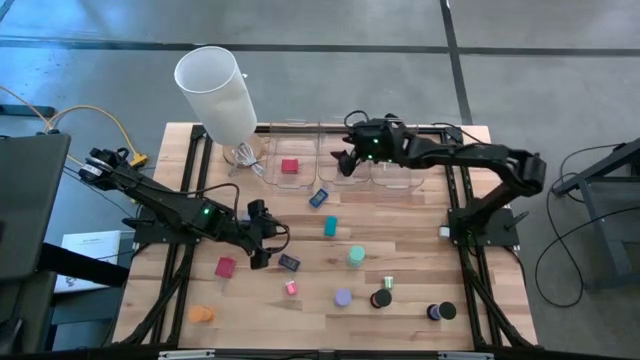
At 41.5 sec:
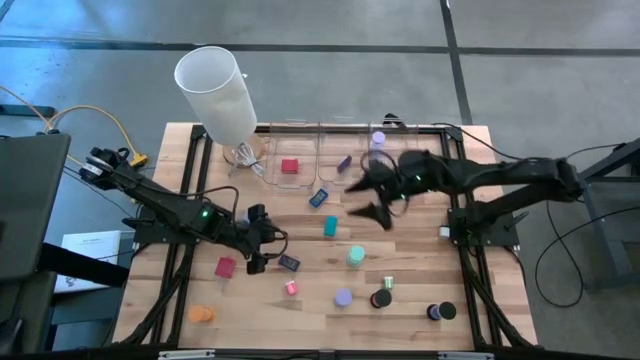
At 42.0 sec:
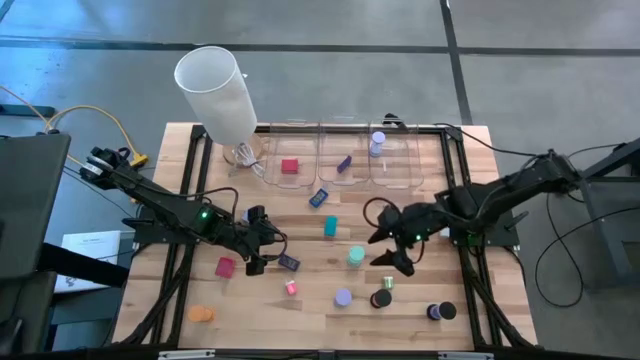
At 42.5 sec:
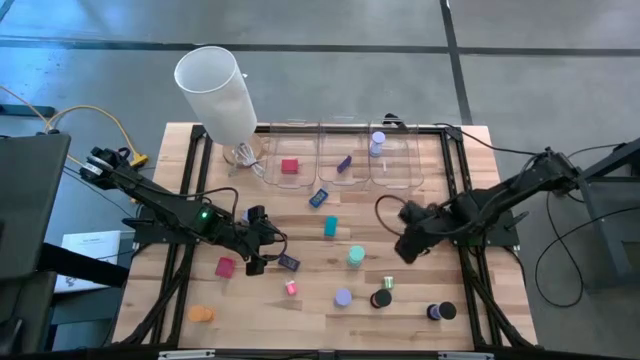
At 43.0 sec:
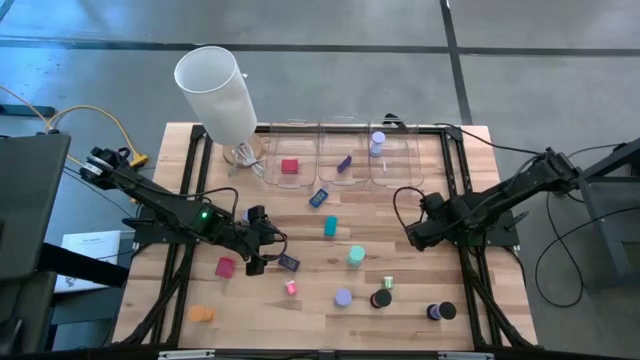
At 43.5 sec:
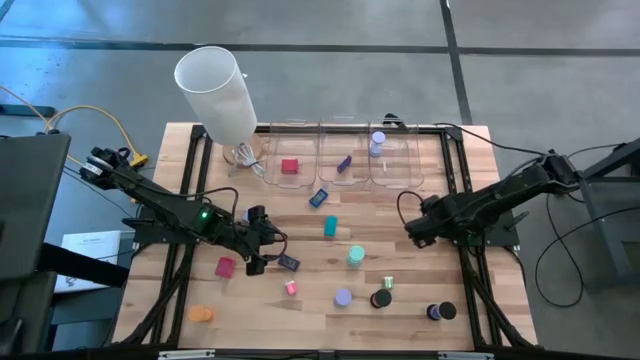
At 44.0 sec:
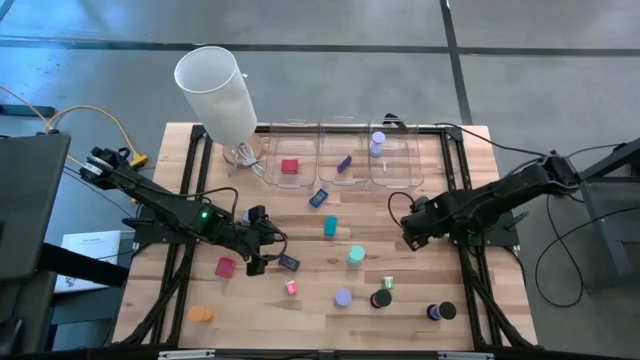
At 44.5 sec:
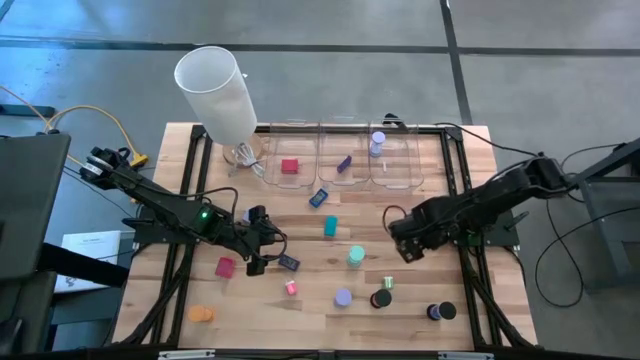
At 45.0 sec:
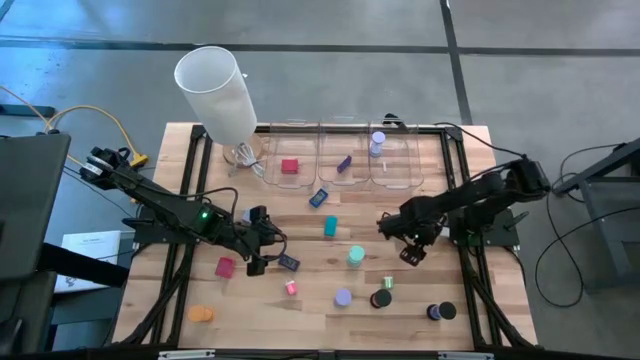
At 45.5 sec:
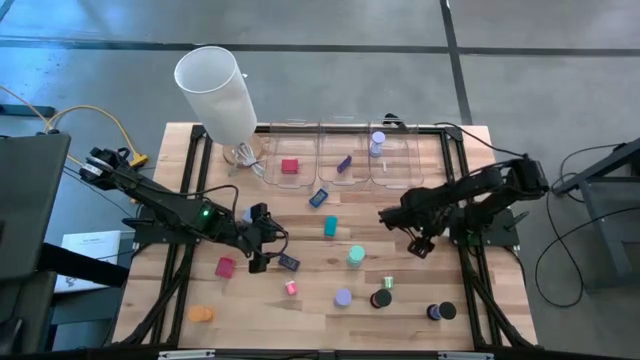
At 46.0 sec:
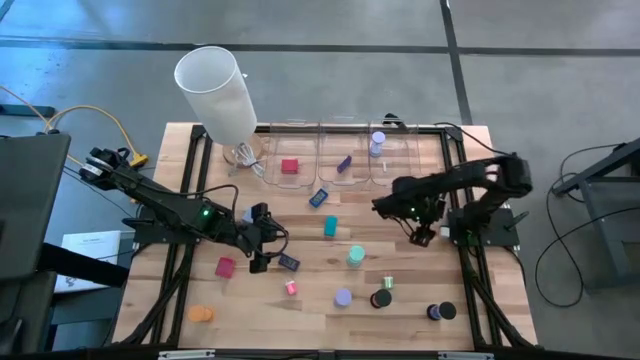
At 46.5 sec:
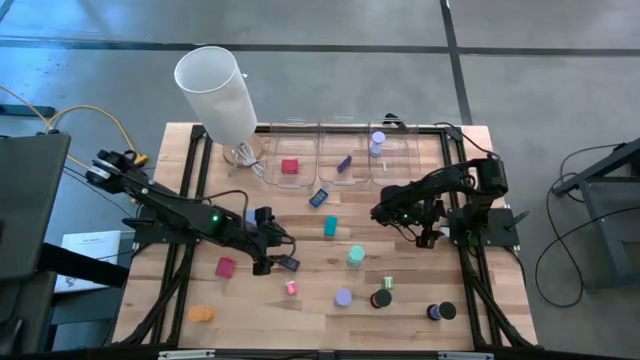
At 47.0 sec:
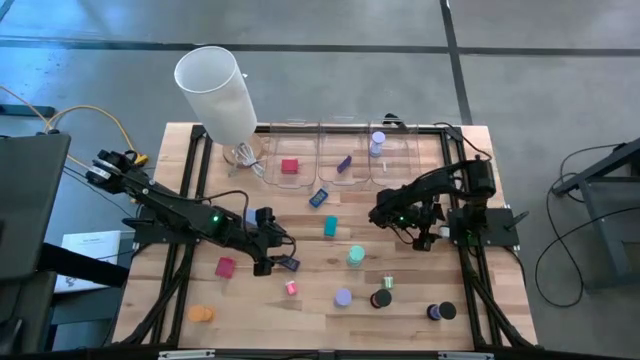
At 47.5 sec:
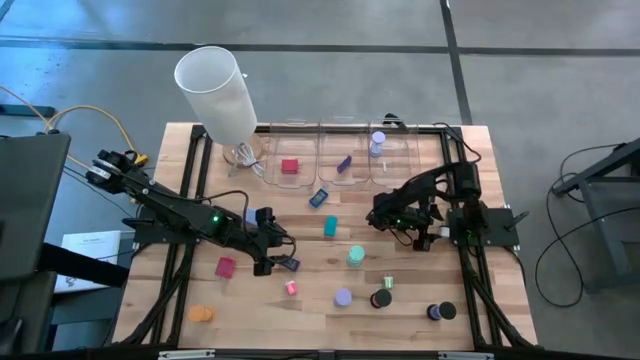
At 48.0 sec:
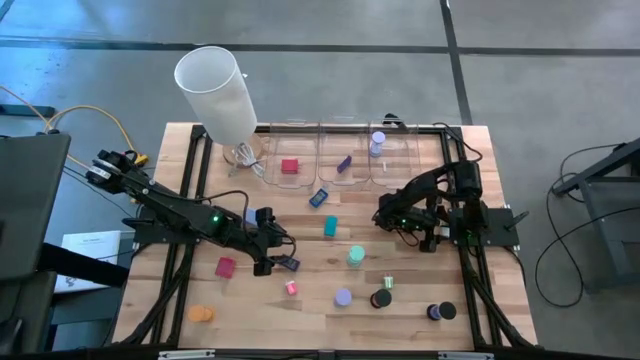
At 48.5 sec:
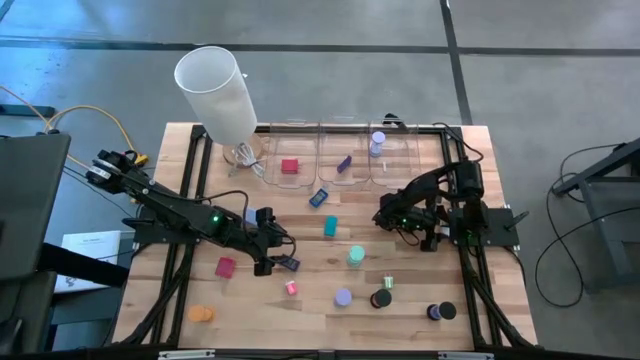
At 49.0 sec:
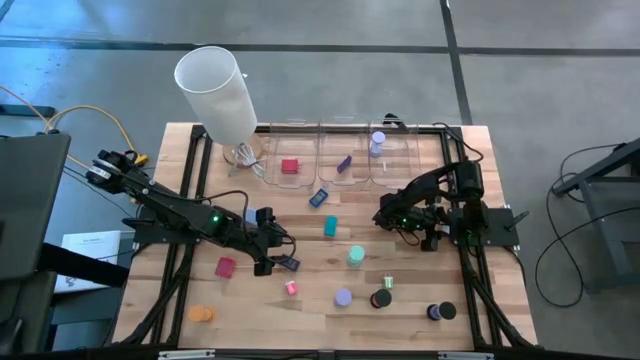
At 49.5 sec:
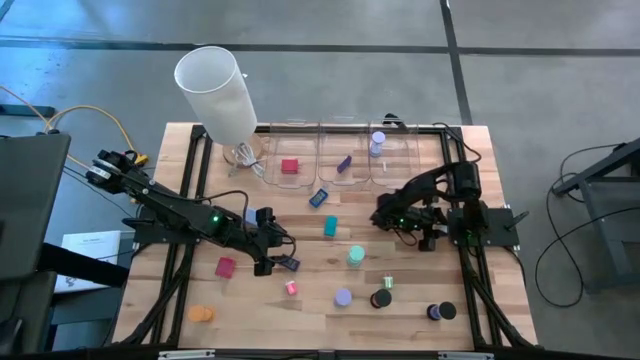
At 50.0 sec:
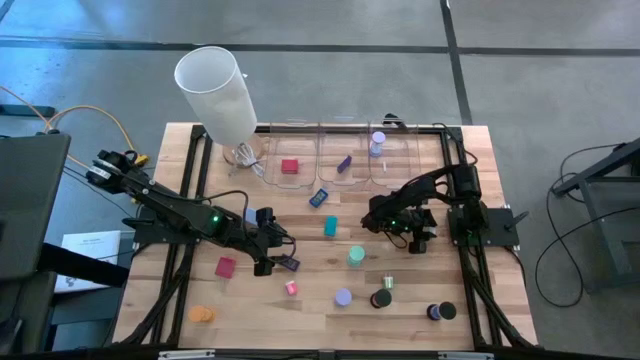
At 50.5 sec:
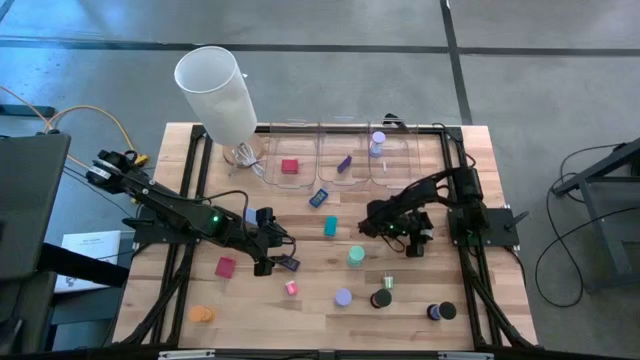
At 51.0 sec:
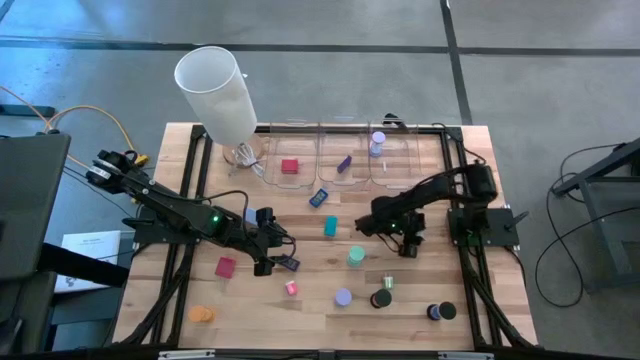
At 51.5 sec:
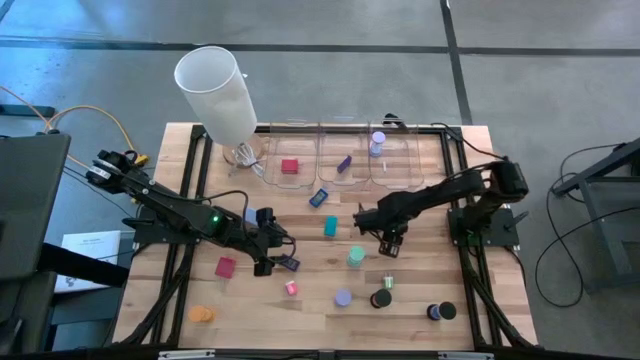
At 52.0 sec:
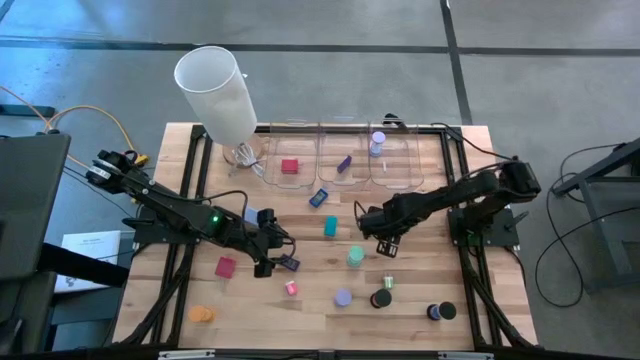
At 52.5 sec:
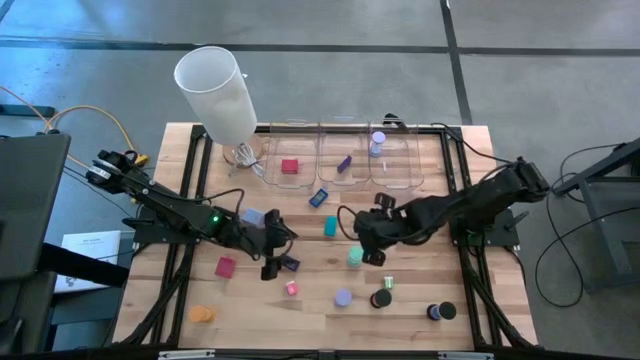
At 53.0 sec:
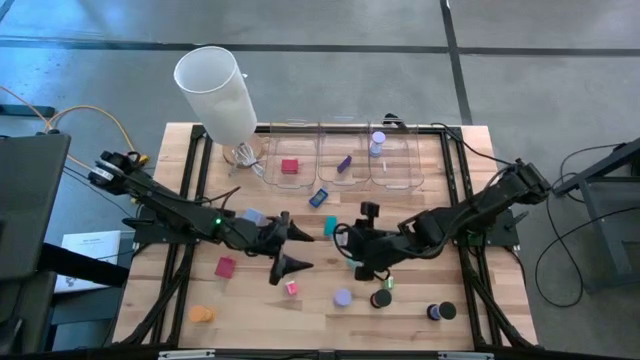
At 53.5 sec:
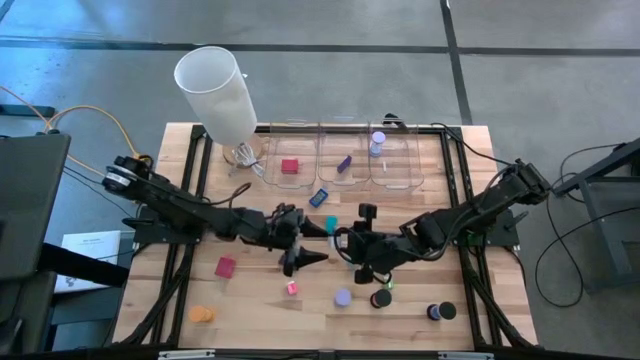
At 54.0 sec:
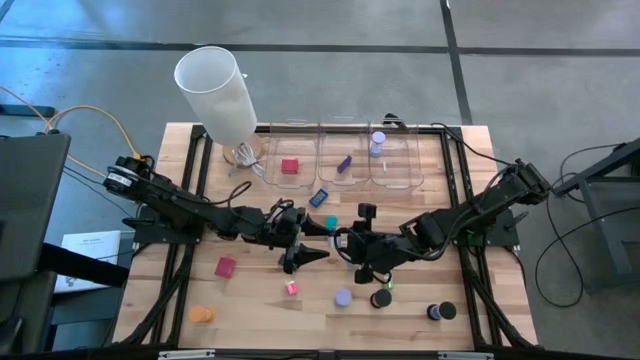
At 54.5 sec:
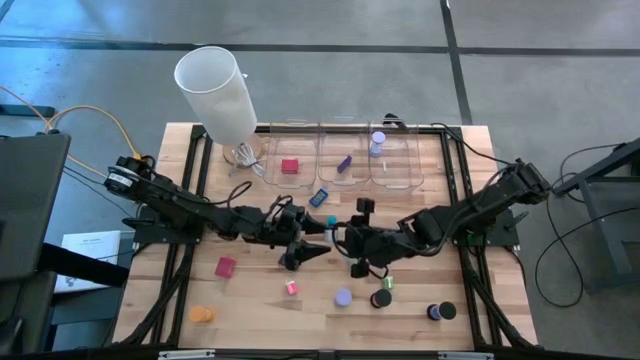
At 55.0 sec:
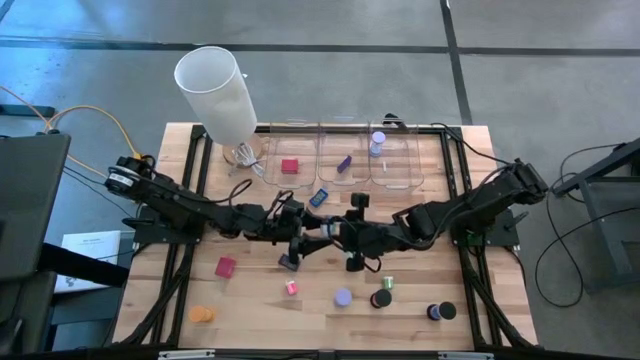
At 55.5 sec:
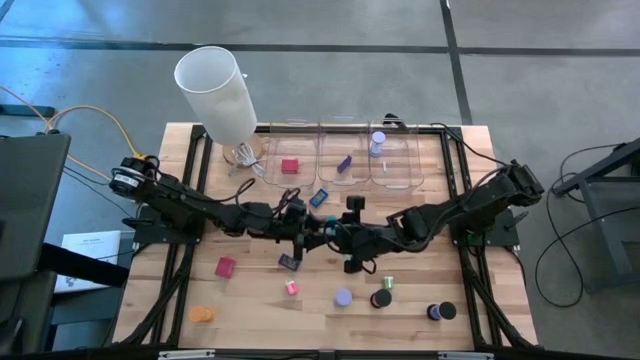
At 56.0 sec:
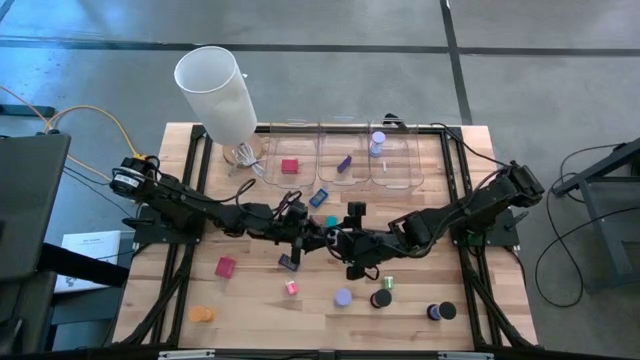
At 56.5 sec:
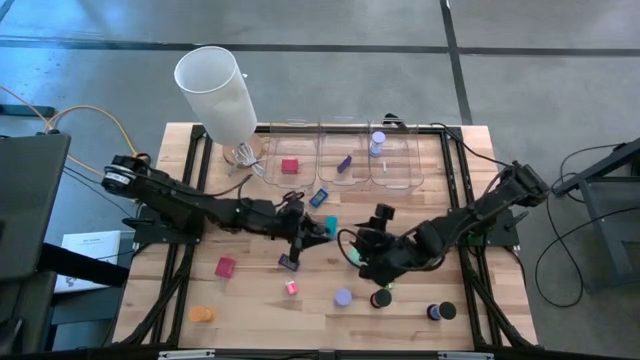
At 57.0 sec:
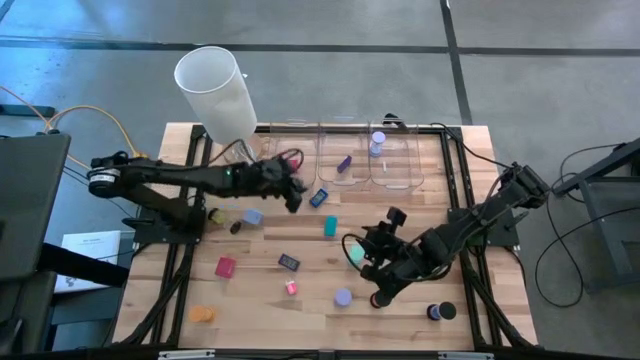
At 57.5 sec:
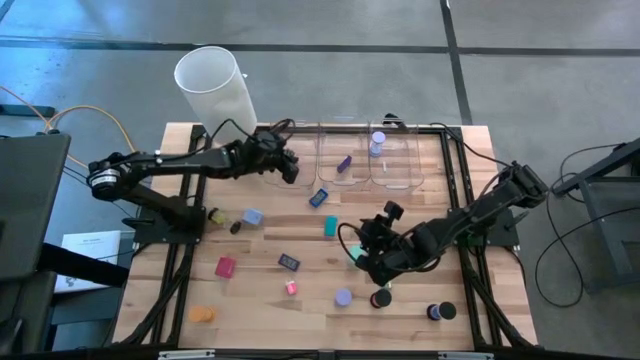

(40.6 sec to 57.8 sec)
Task: Pick & Place Office items
Put the white charger adapter into the left transparent bin

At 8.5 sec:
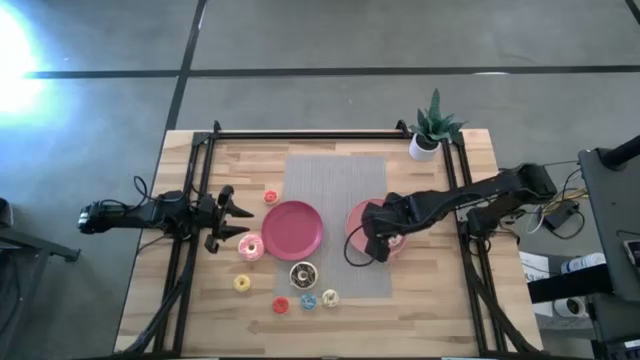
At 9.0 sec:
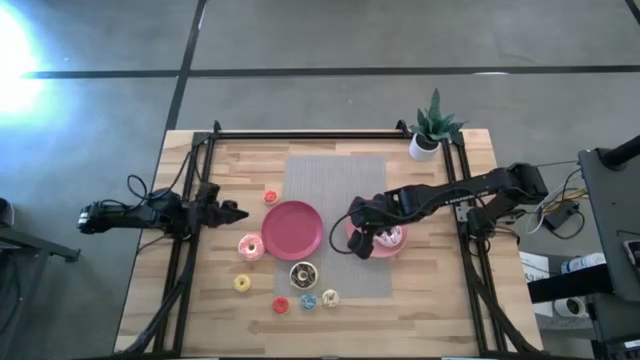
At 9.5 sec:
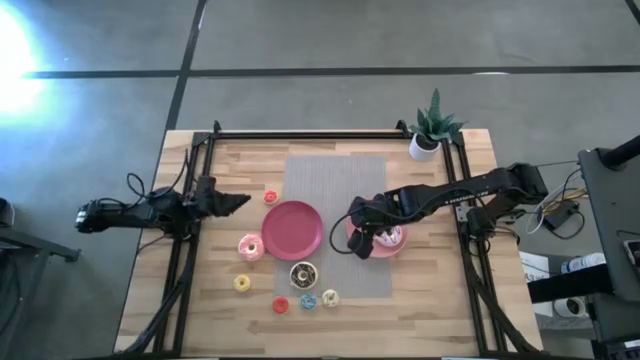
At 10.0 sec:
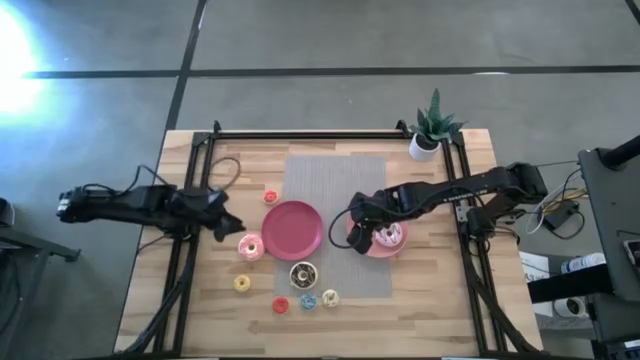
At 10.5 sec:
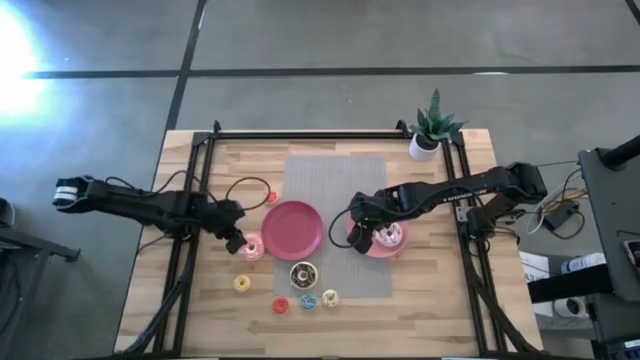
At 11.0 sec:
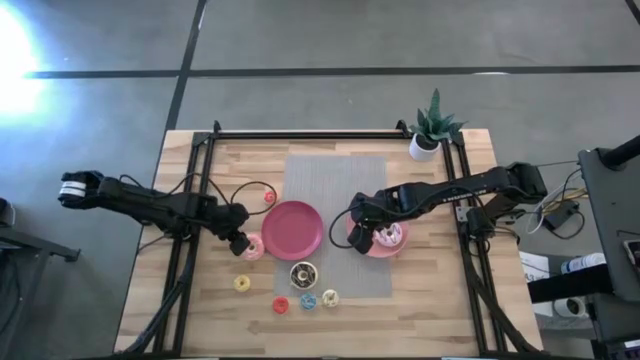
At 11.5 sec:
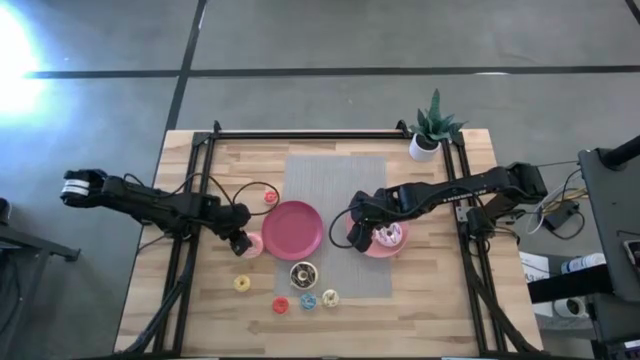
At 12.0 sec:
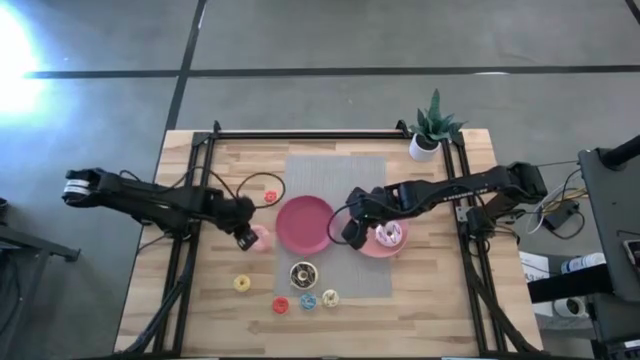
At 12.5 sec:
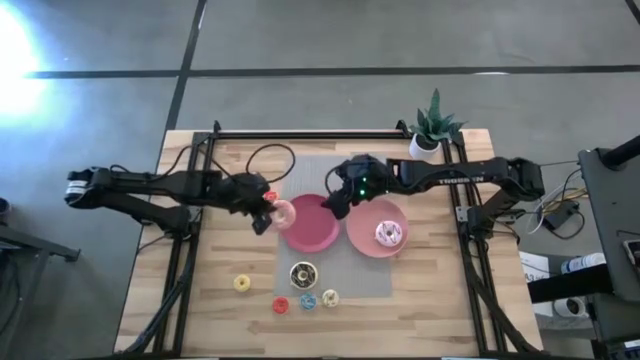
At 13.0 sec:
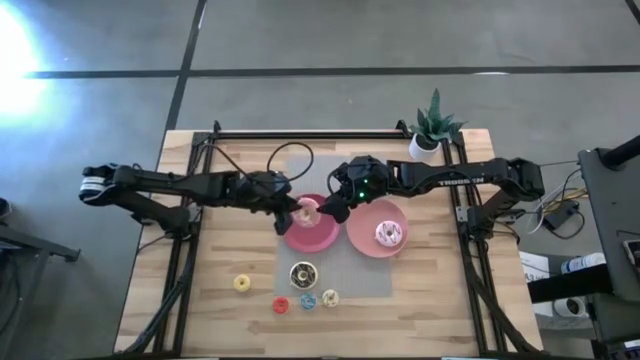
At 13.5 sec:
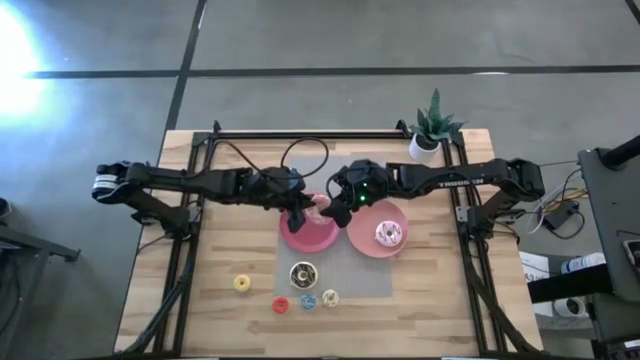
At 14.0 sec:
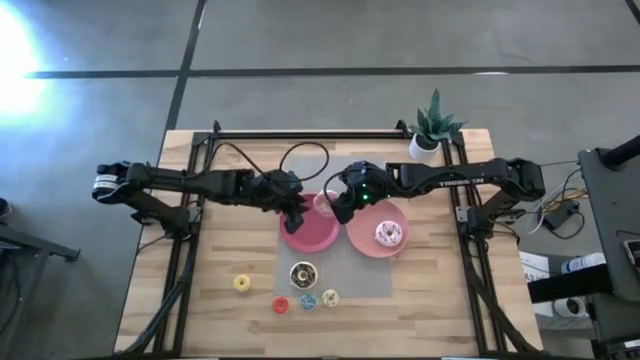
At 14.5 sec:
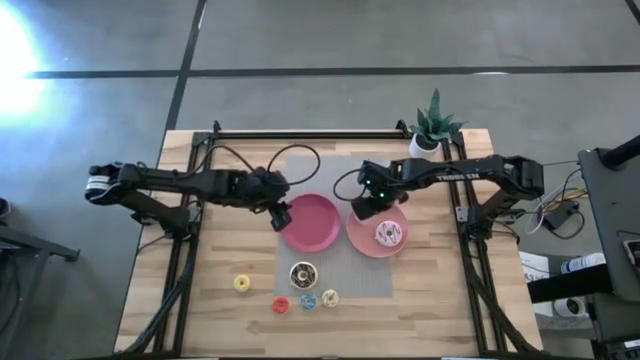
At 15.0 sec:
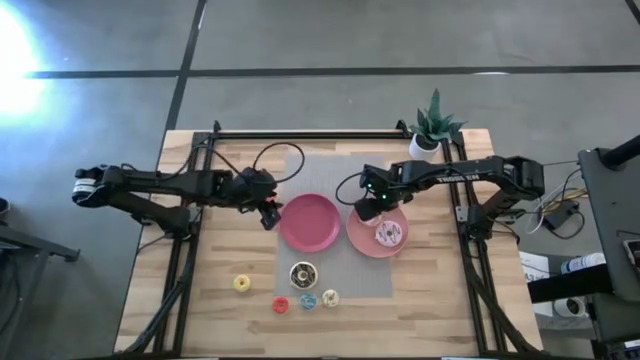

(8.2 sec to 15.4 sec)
Task: Pick & Place donuts
Put the large pink doughnut on the light pink plate
